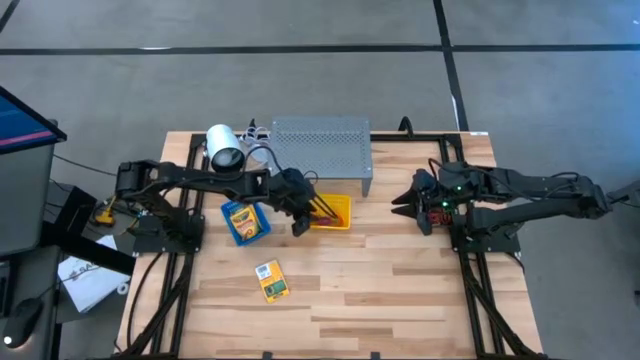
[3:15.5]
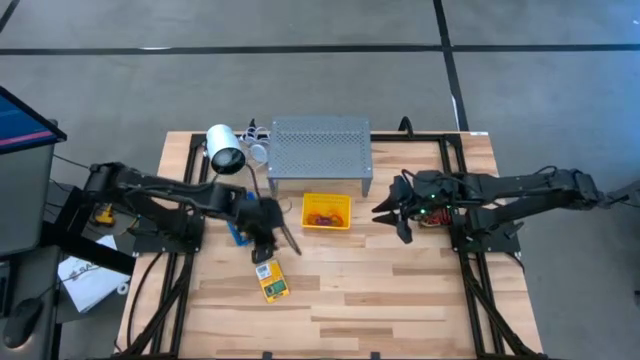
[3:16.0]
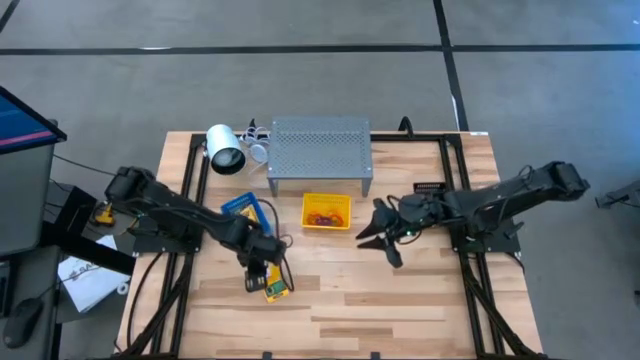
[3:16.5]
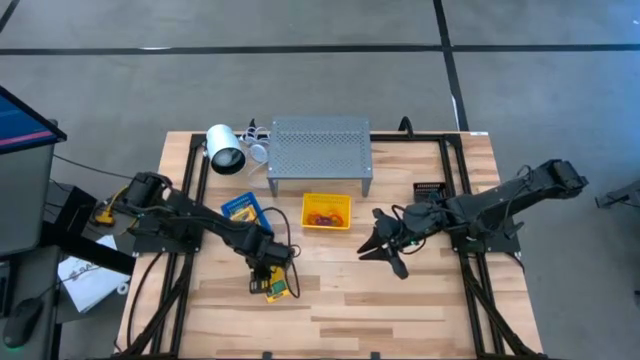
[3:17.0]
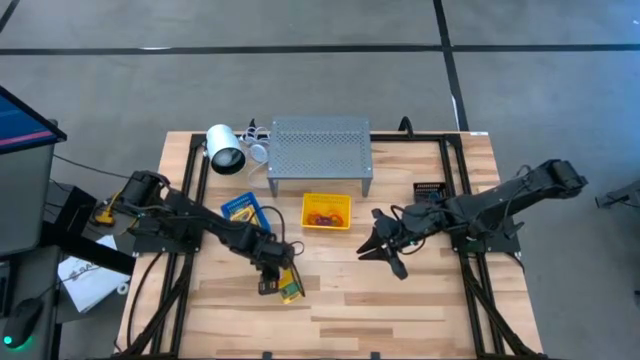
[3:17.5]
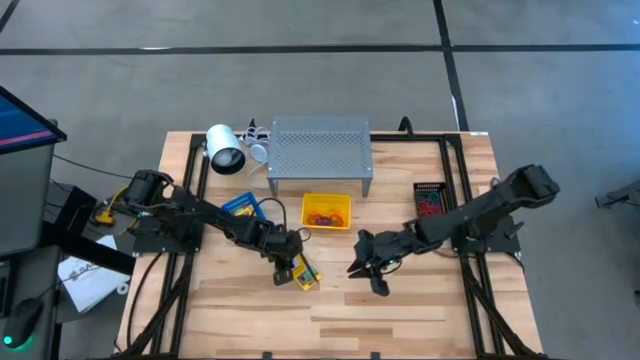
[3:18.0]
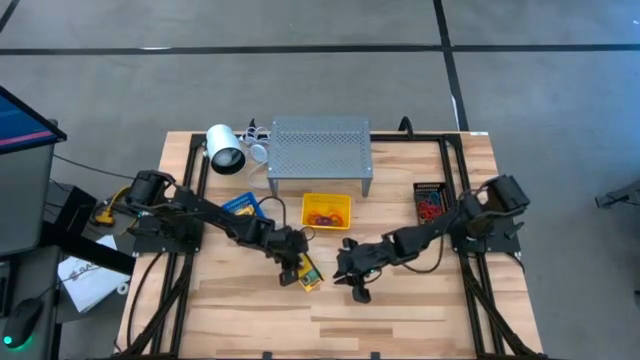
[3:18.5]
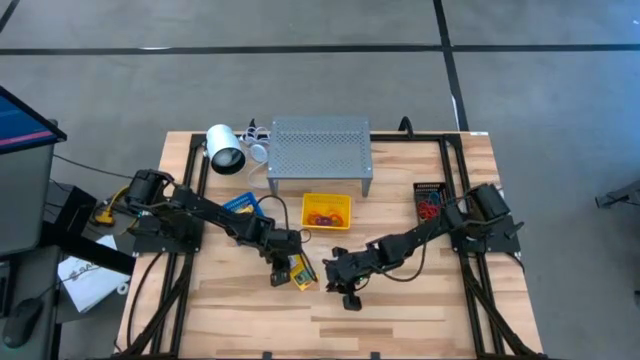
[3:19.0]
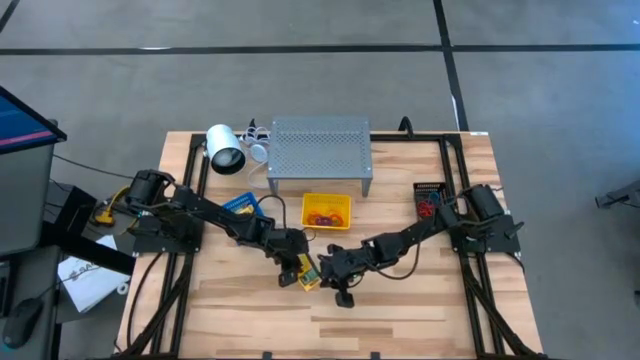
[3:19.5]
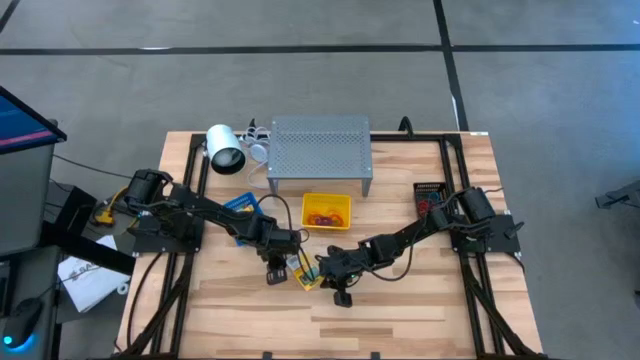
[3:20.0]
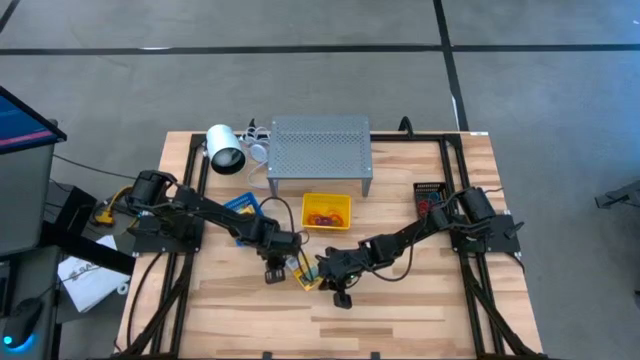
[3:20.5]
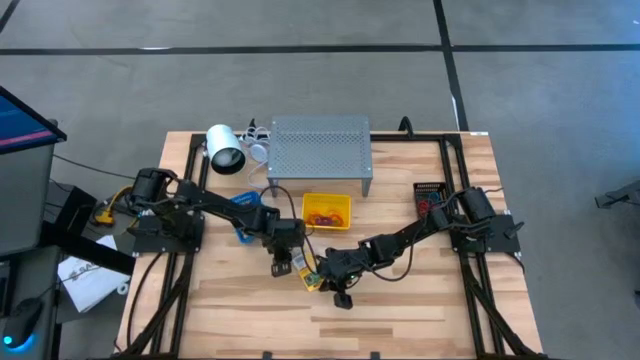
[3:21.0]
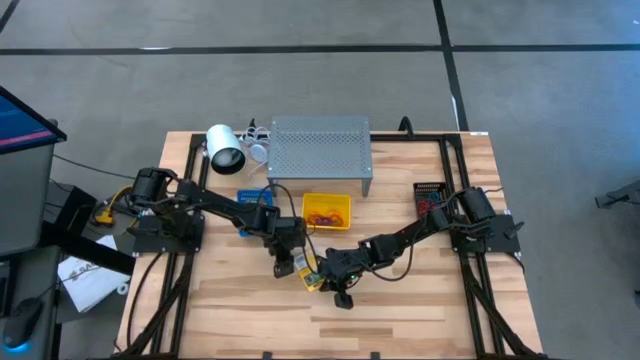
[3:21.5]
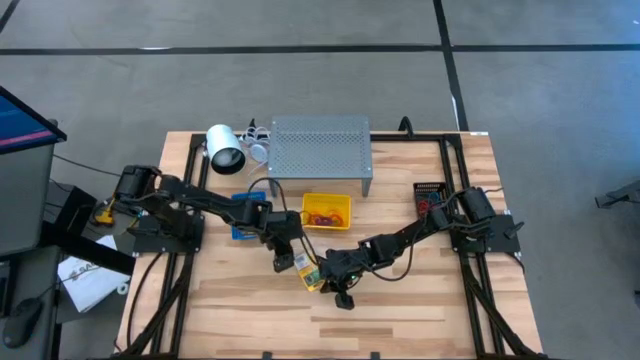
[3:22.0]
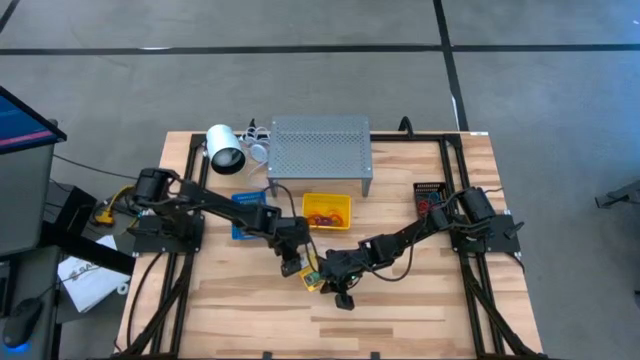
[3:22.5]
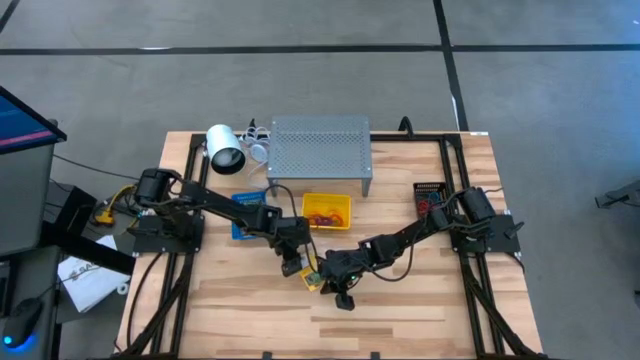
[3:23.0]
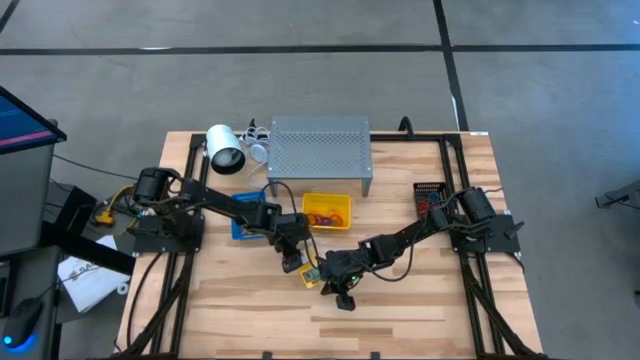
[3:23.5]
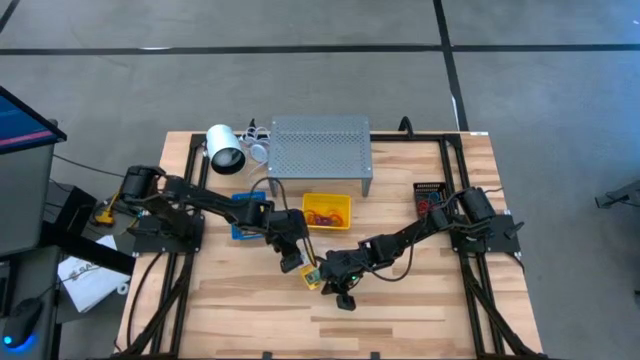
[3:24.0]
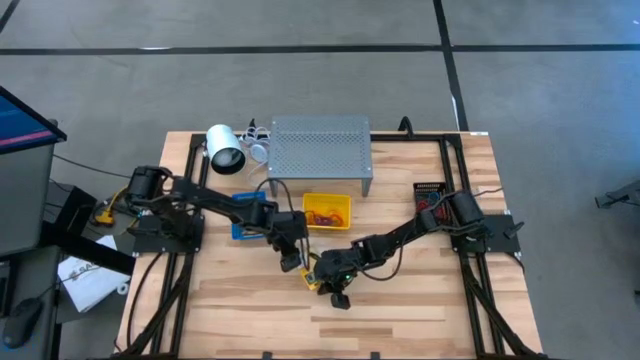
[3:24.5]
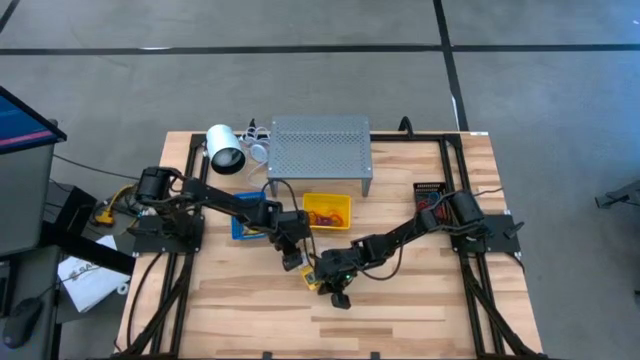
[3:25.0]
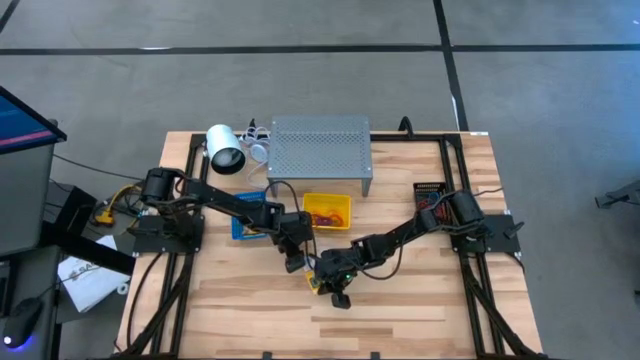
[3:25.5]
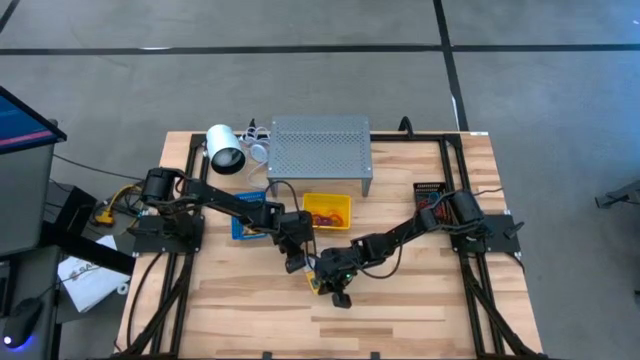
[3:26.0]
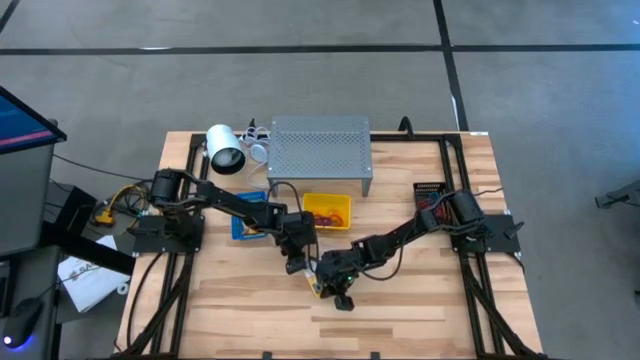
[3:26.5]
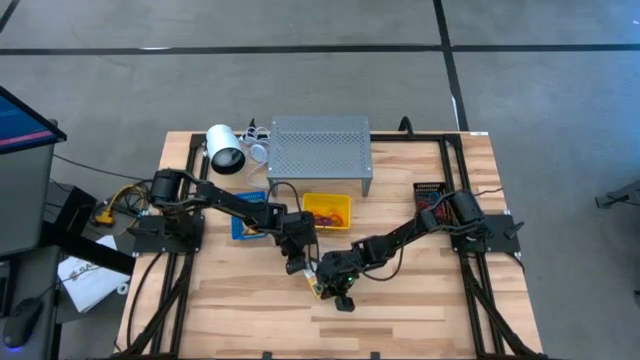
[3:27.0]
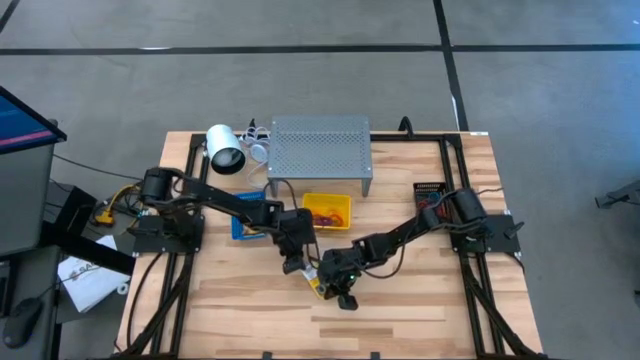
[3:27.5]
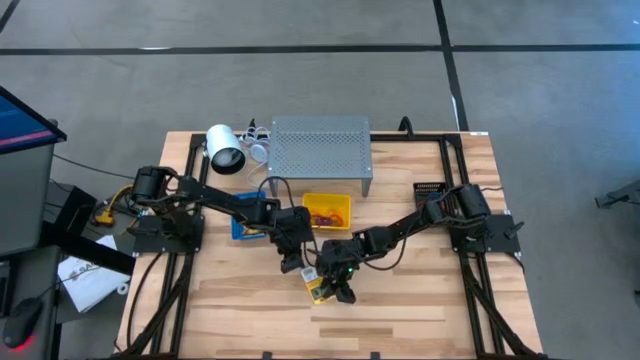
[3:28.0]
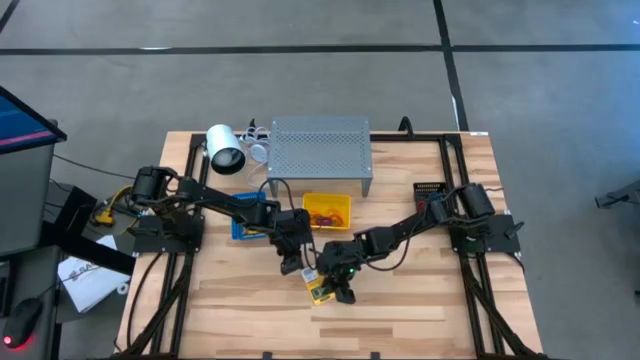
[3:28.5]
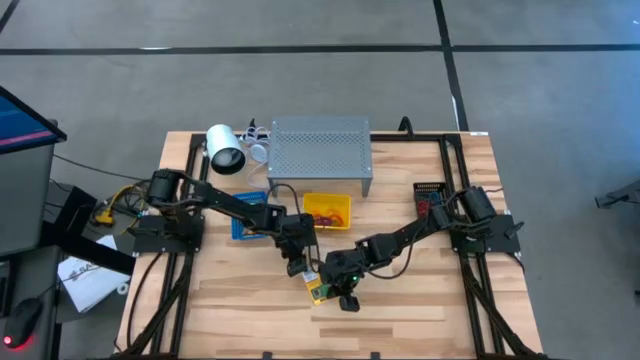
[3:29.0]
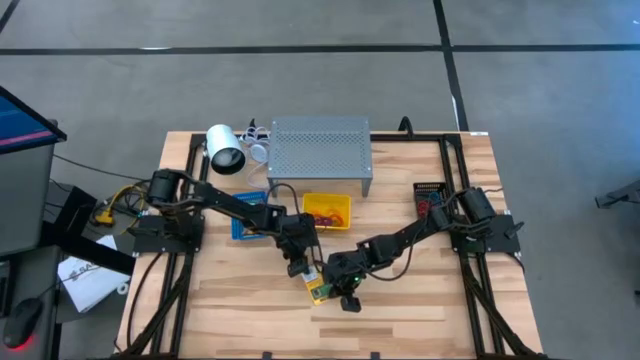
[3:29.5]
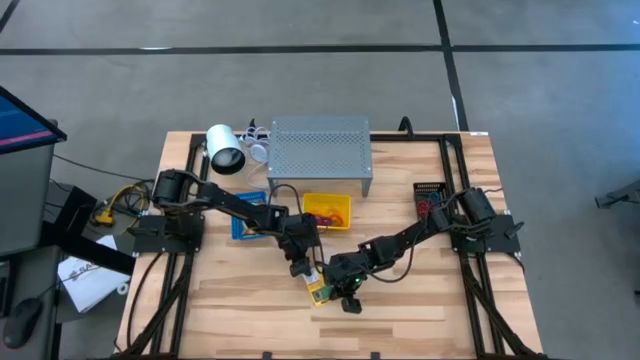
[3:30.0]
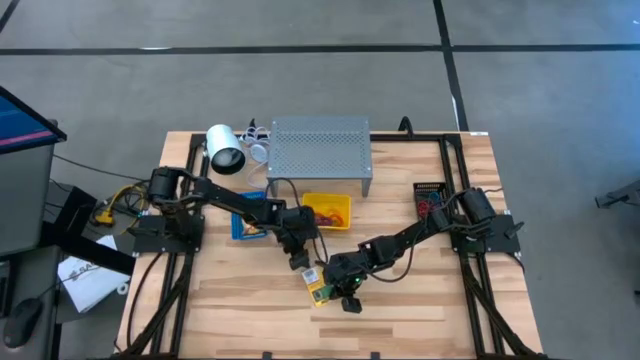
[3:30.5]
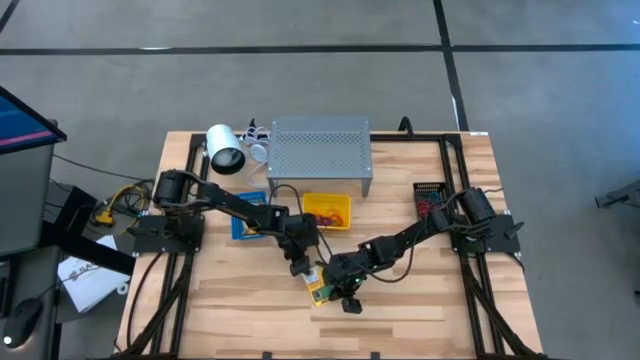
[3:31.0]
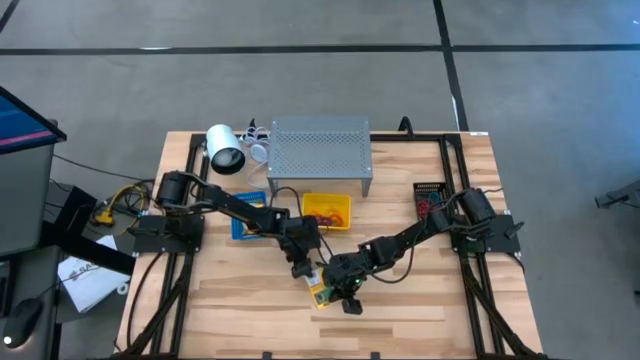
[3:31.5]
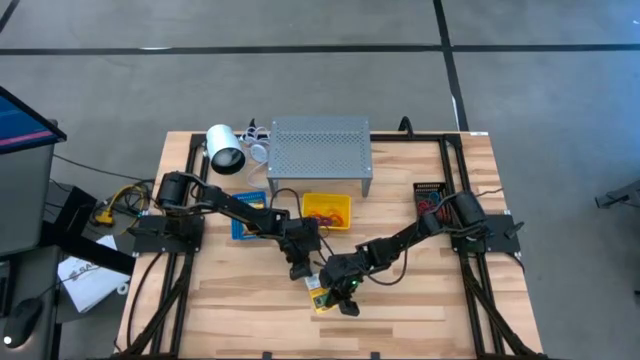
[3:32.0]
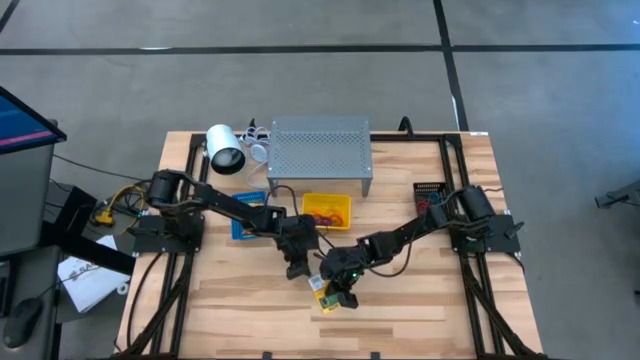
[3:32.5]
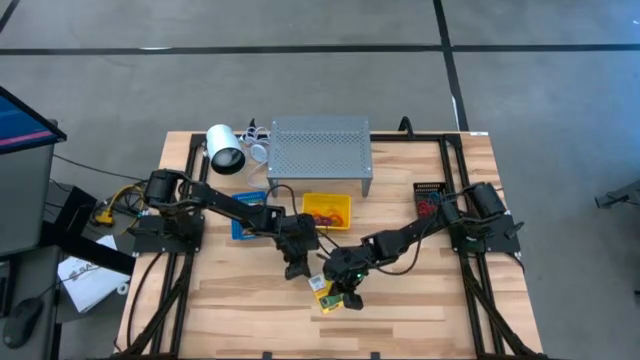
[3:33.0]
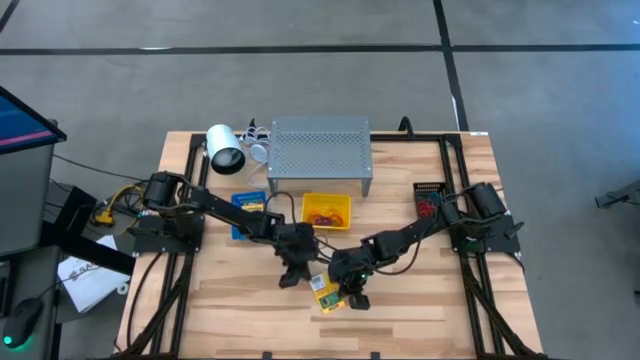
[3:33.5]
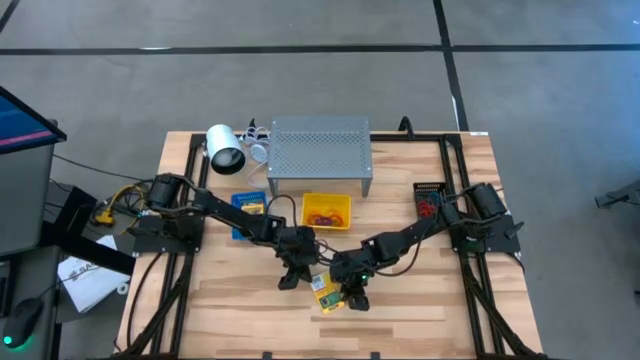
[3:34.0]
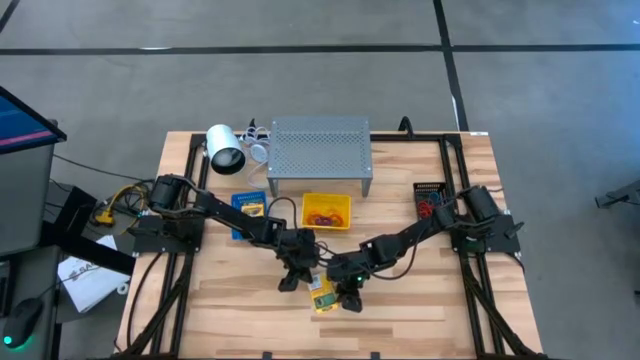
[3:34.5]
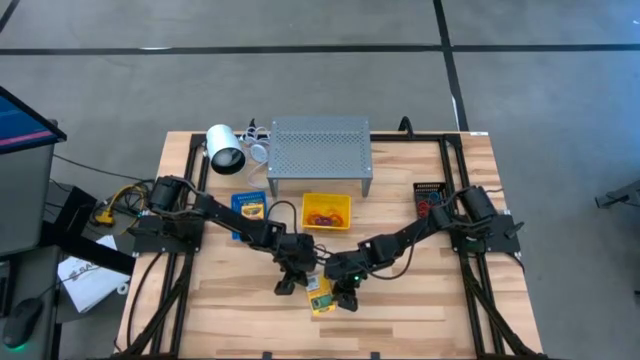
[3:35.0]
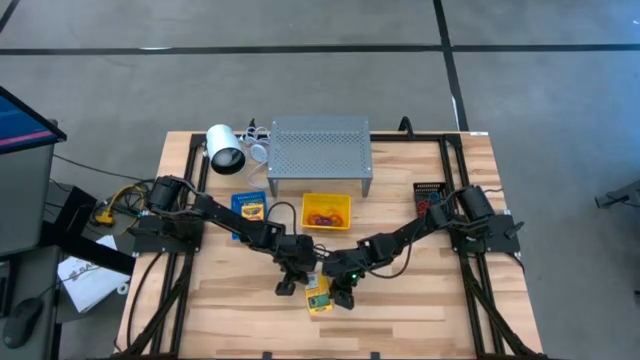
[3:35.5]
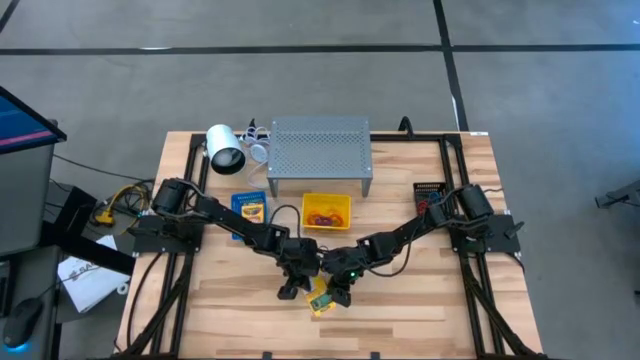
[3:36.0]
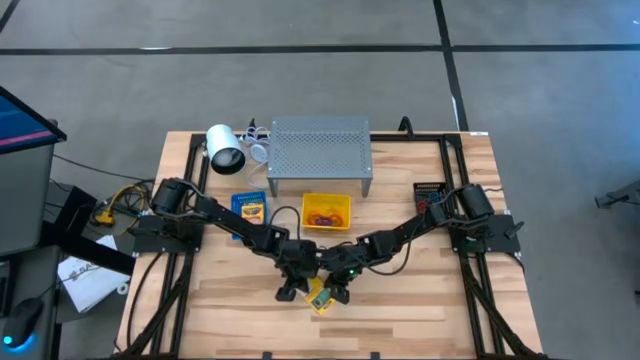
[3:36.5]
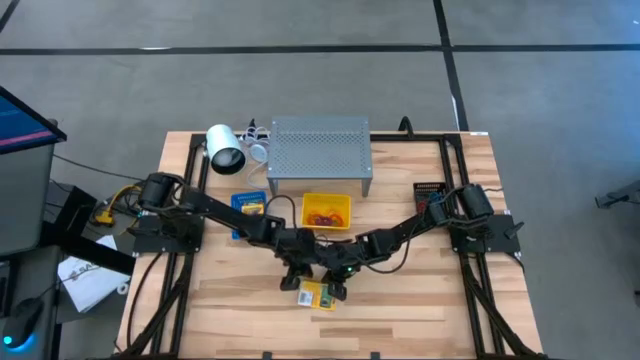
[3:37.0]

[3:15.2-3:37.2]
Task: Pick & Place Office Desk Supplies
Put the crayon box into the blue bin
